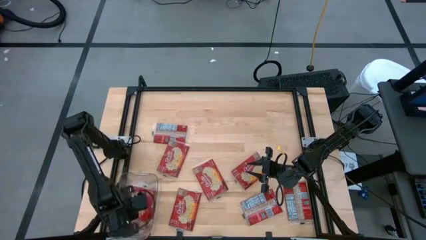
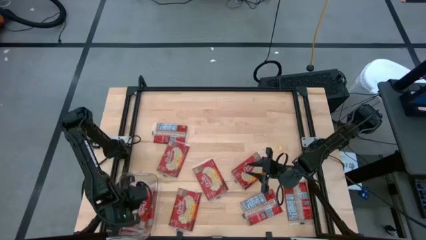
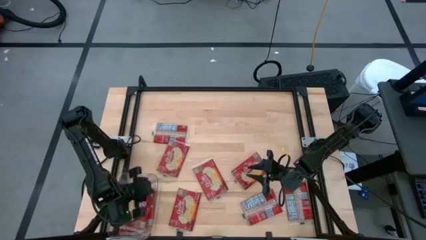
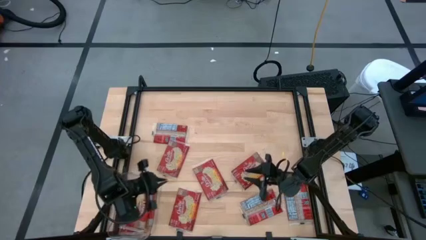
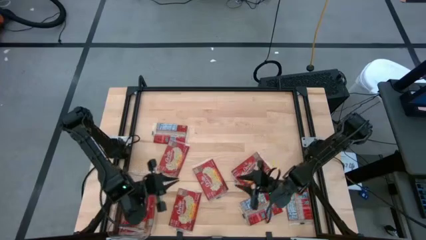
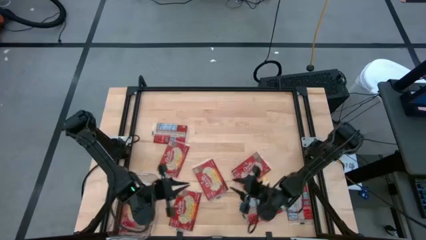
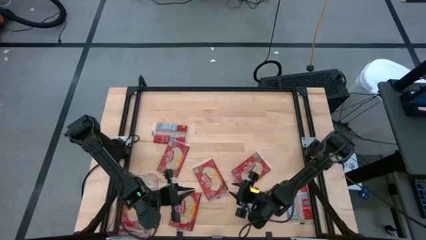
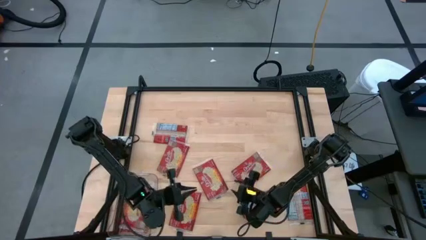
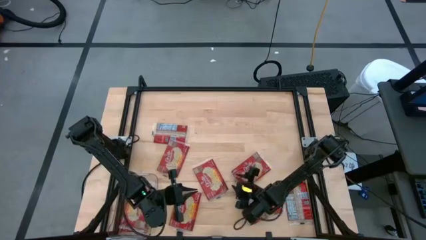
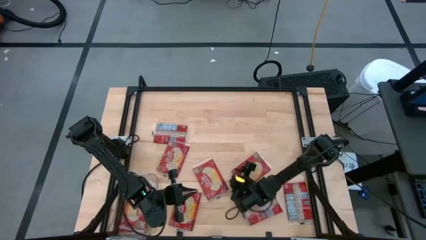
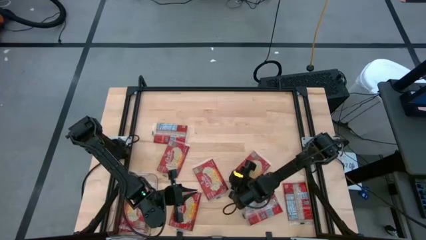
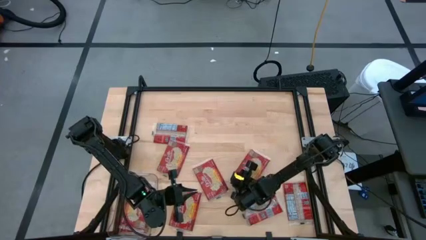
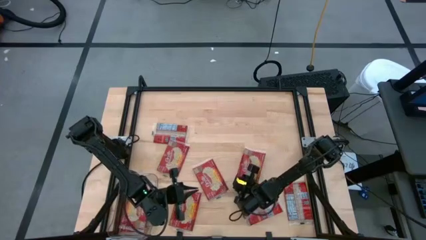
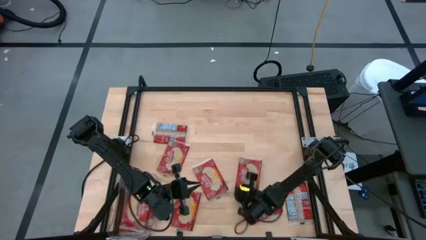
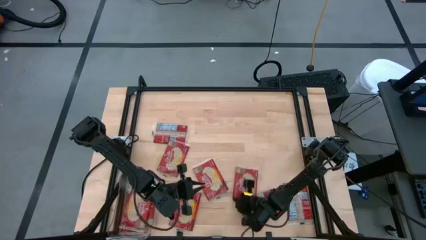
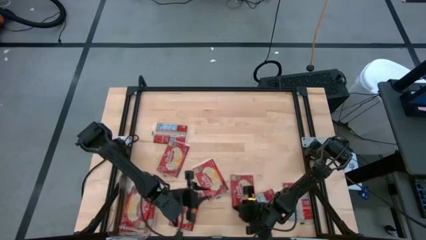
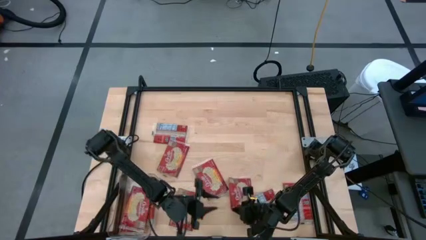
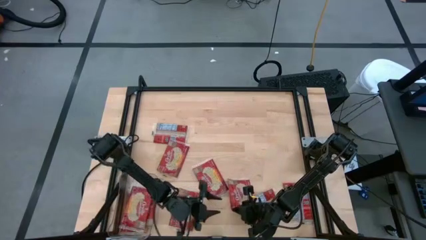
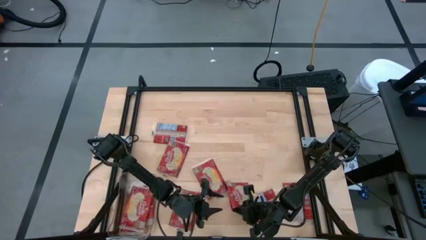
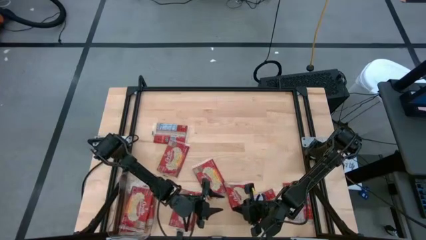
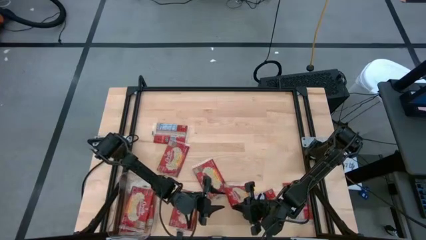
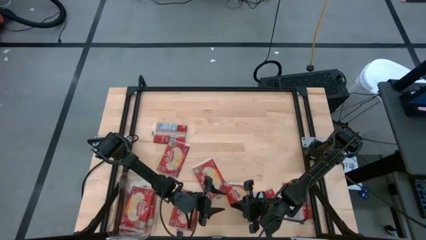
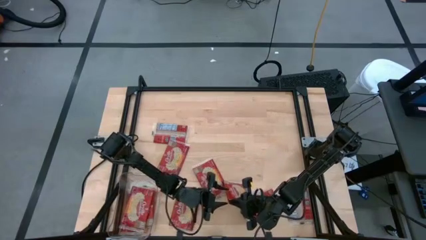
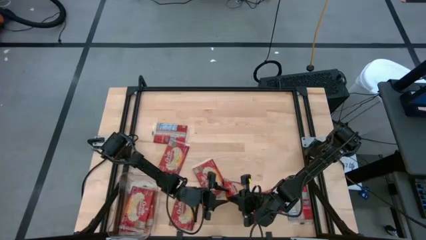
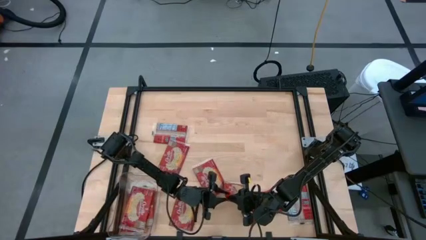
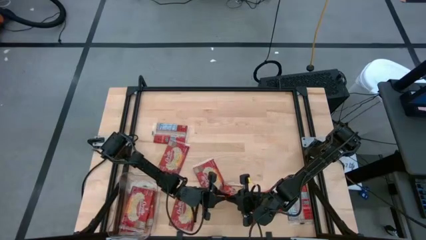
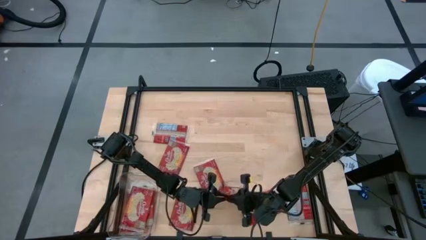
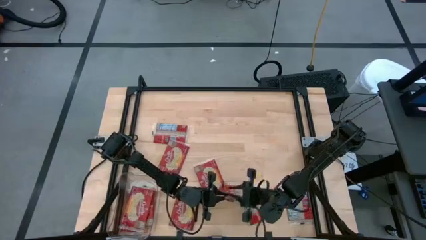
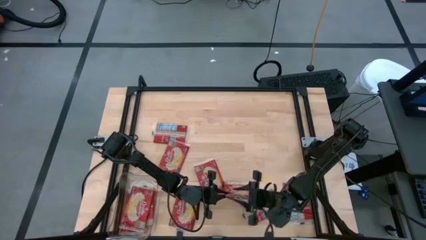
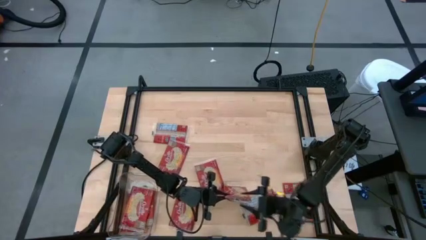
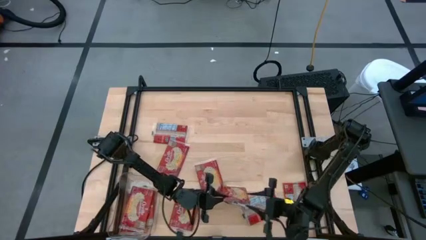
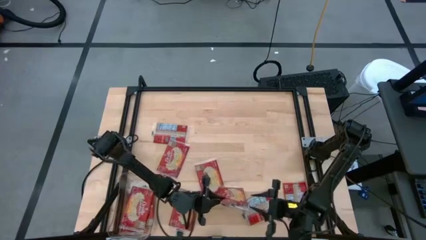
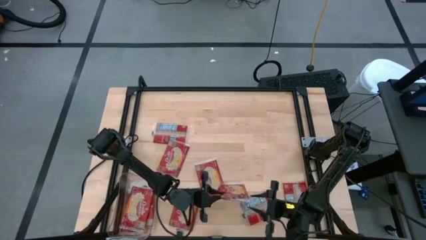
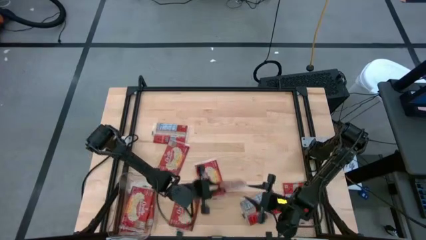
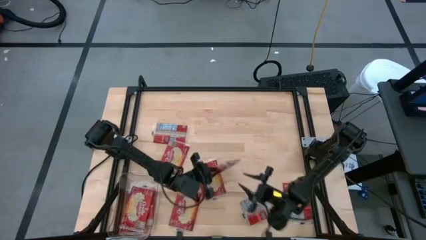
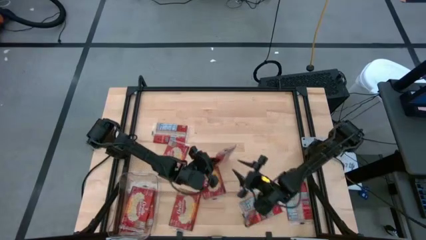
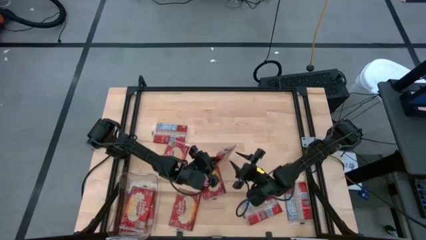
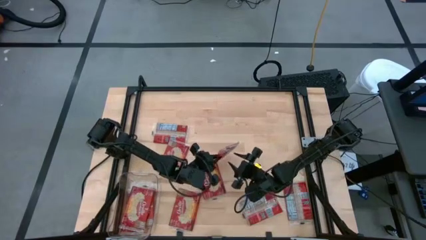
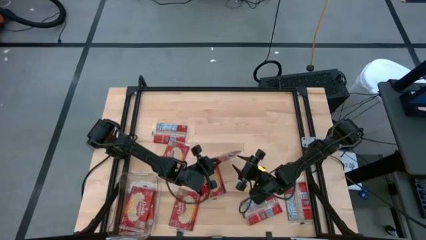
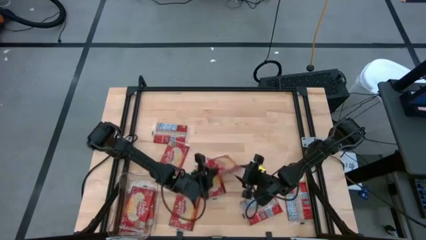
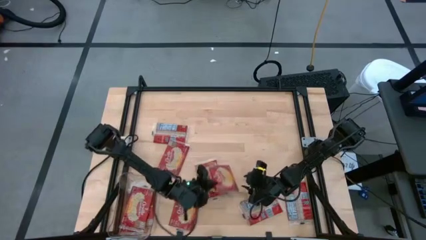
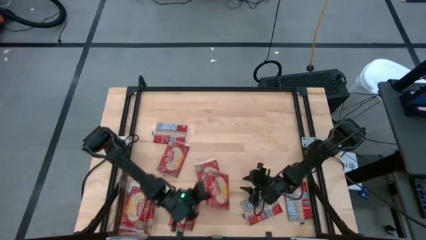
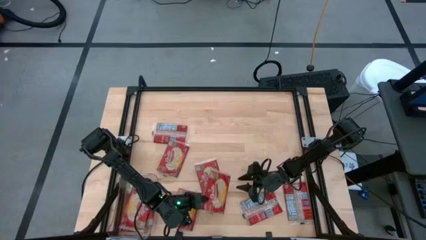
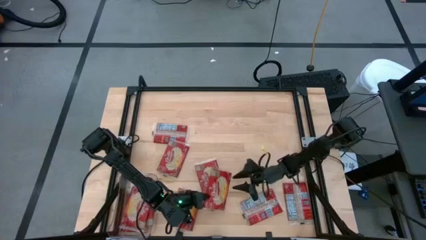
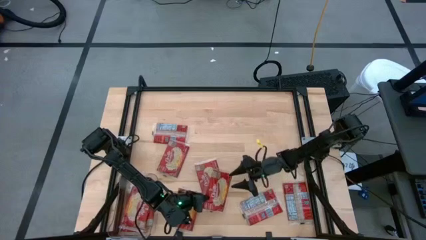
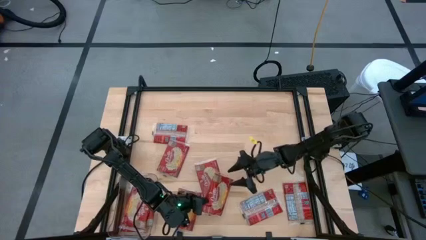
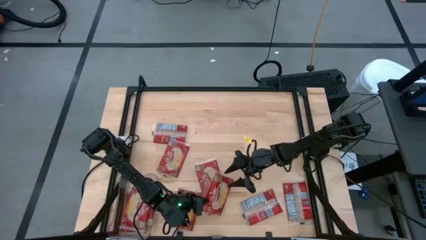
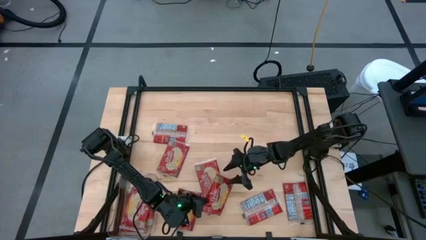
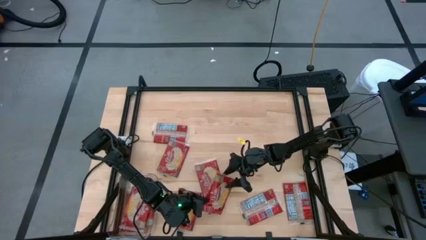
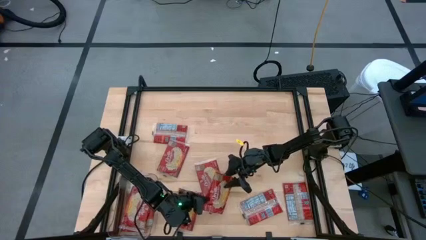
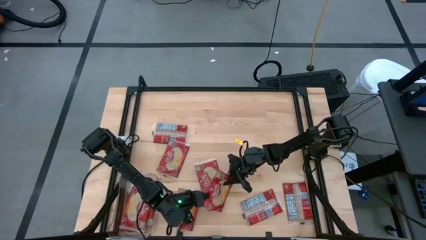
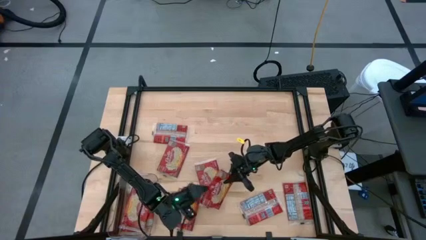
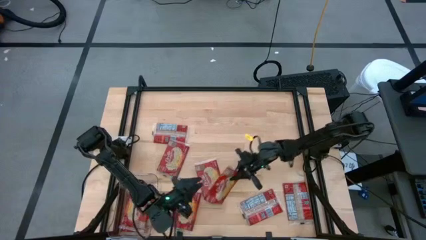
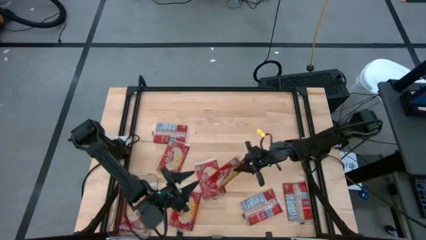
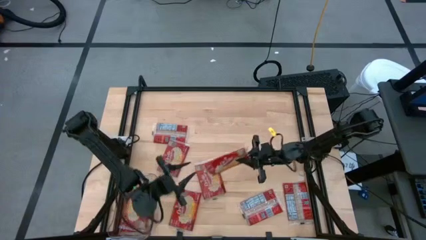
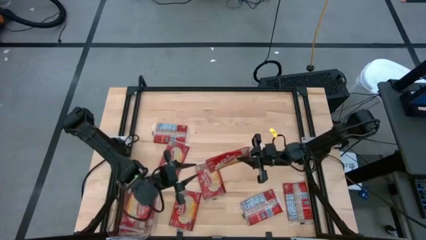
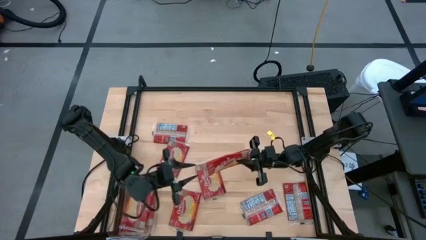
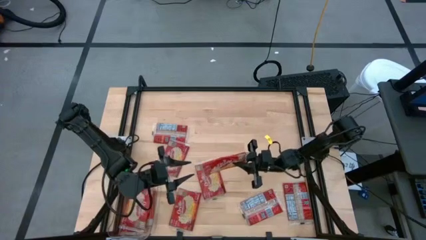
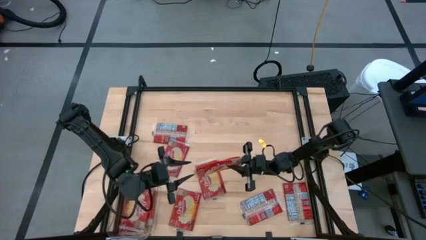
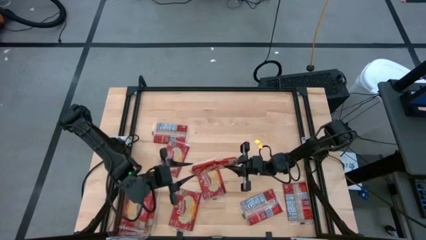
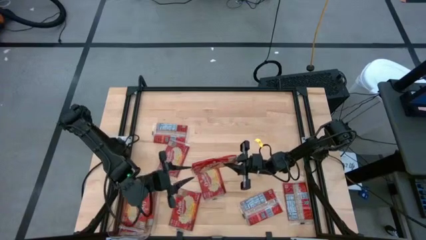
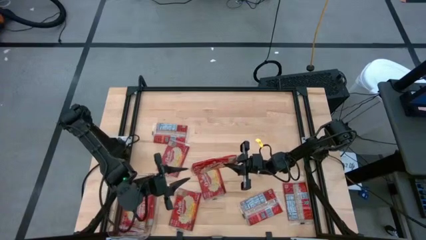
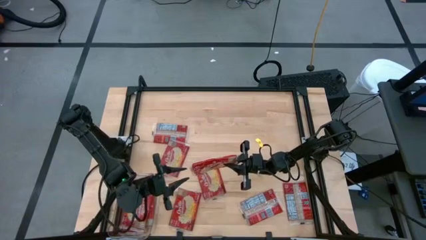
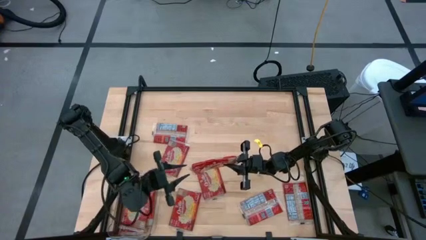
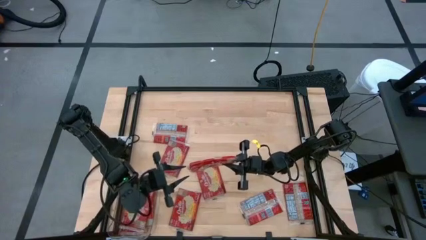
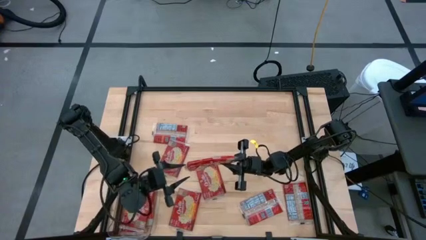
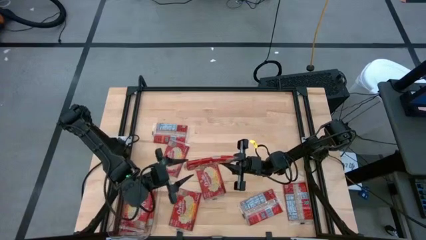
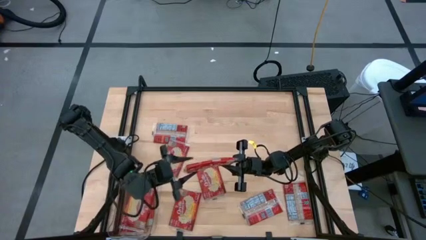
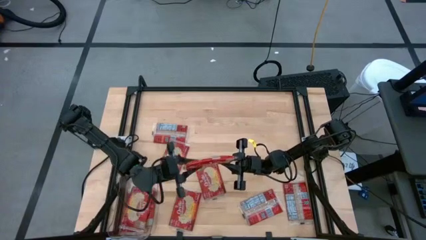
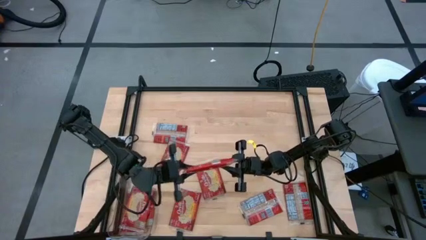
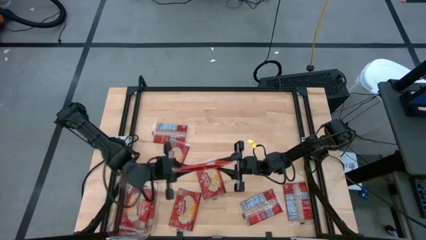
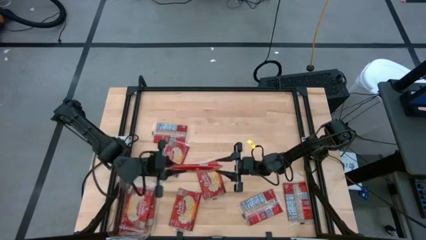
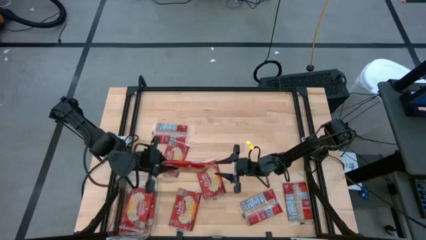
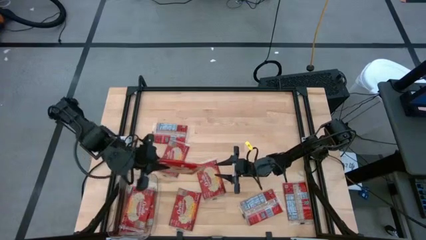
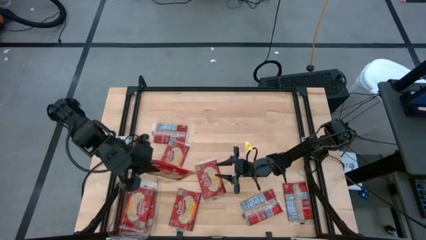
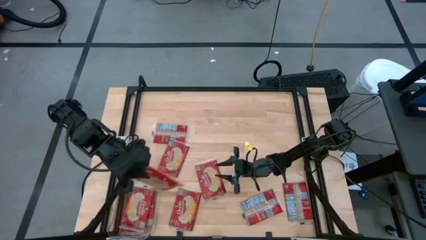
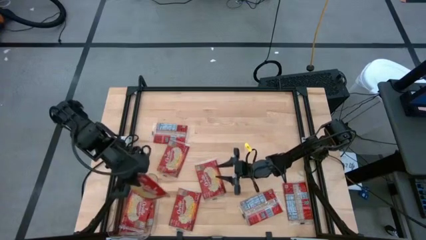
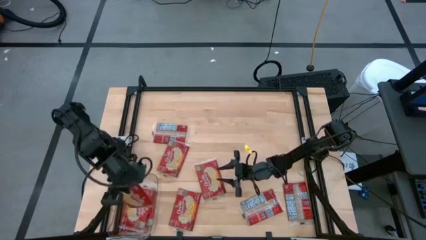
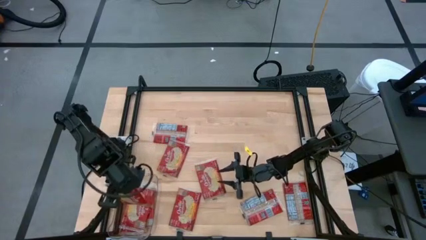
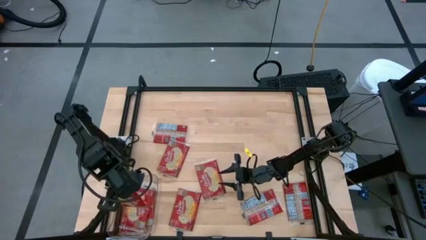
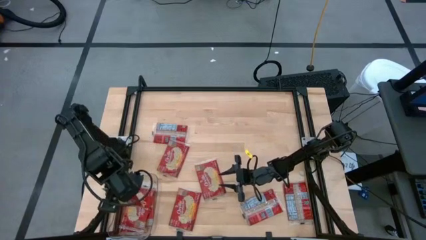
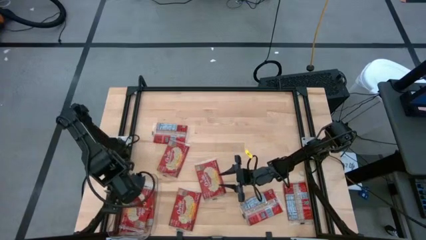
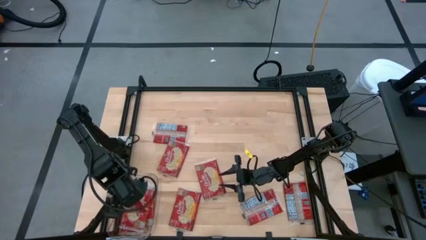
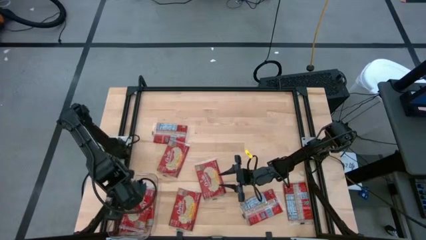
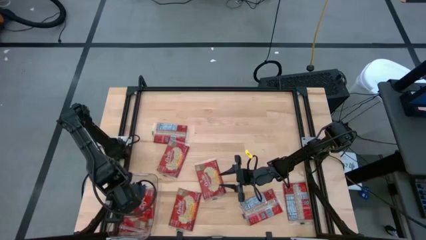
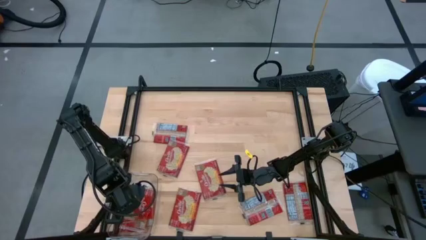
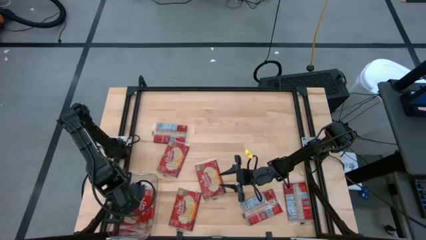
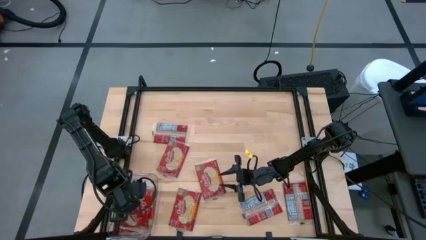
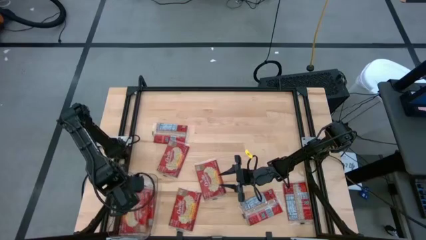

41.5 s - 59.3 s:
Task: Sort popcorn bags into baskets
Put the popcorn bag into the transparent bin
